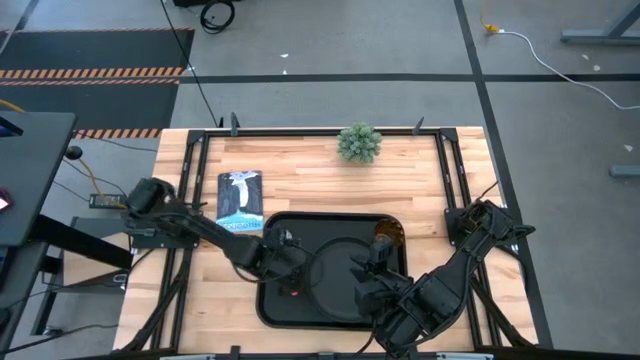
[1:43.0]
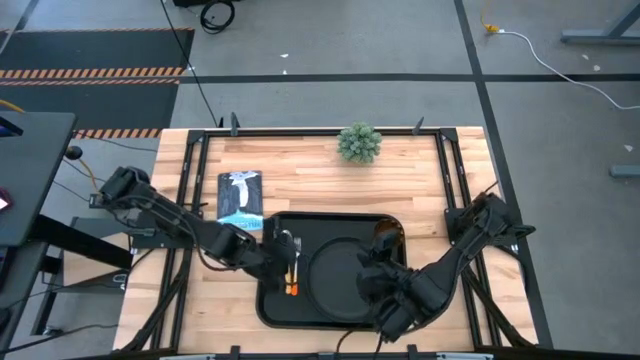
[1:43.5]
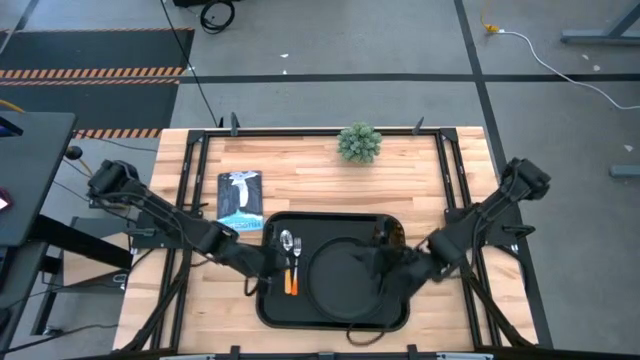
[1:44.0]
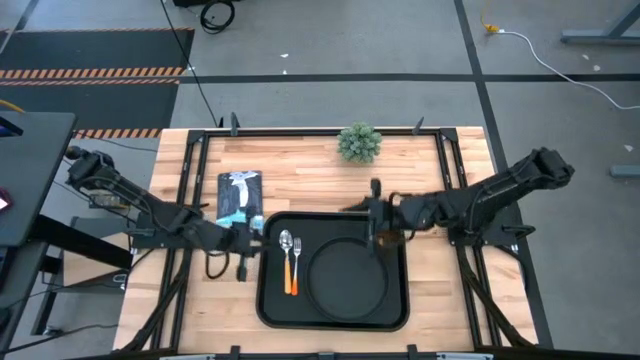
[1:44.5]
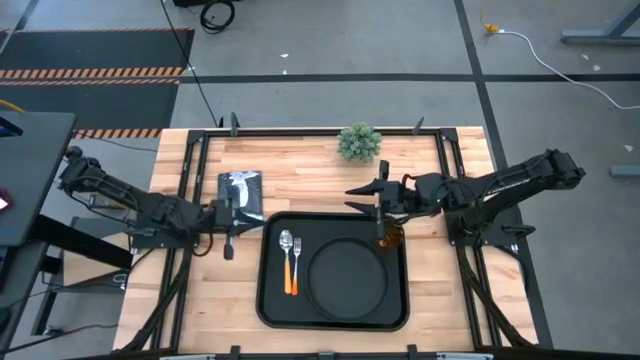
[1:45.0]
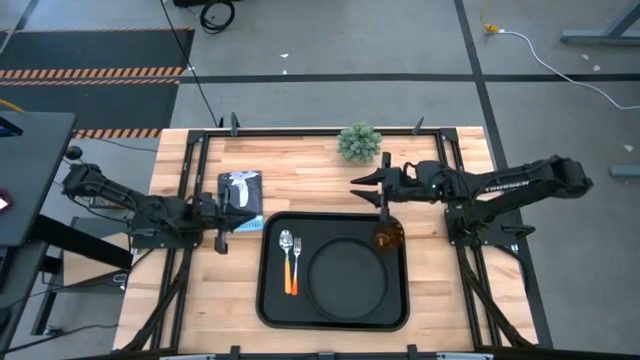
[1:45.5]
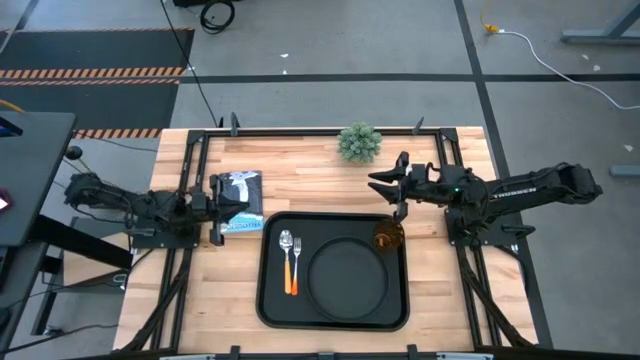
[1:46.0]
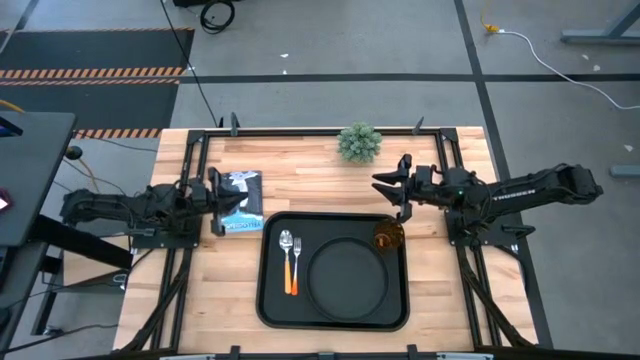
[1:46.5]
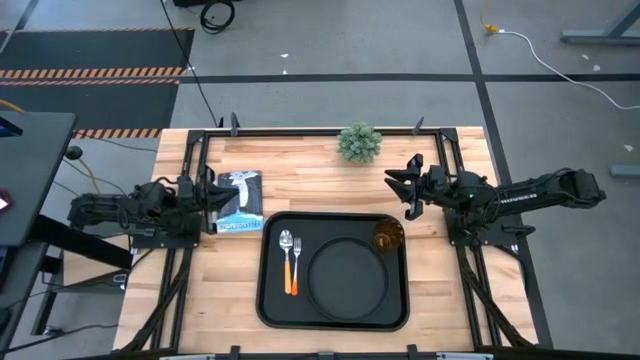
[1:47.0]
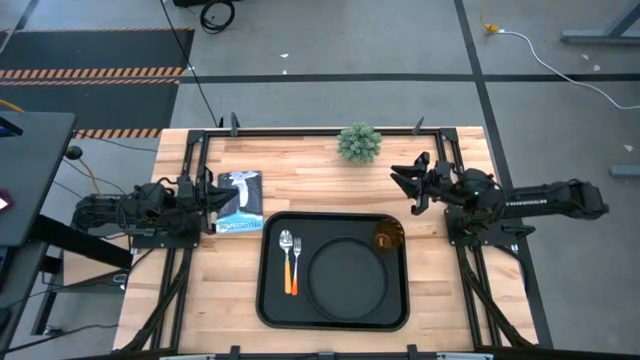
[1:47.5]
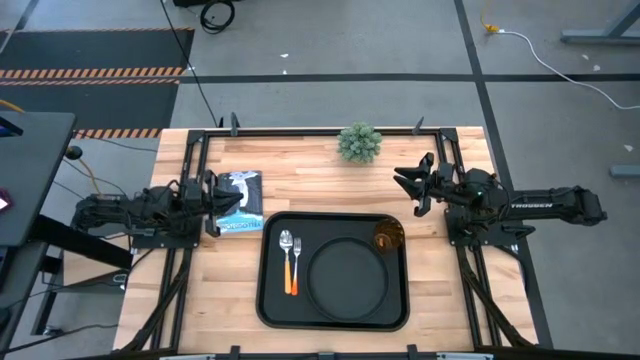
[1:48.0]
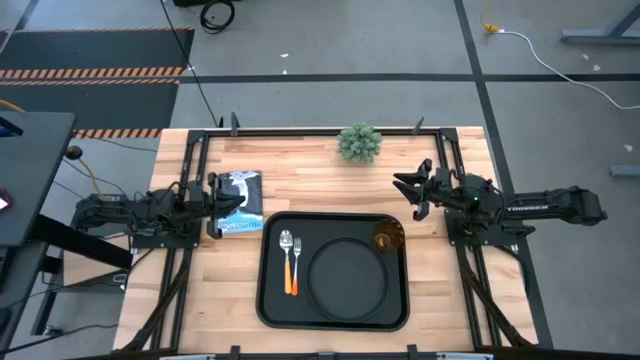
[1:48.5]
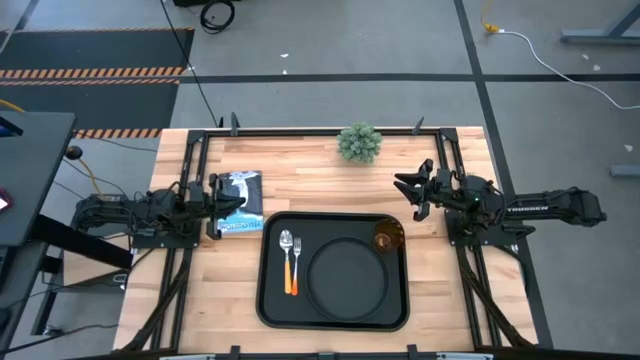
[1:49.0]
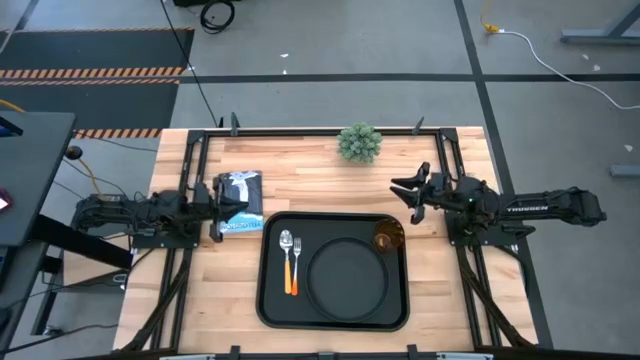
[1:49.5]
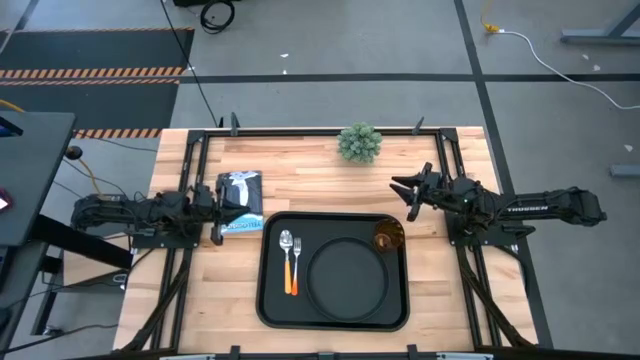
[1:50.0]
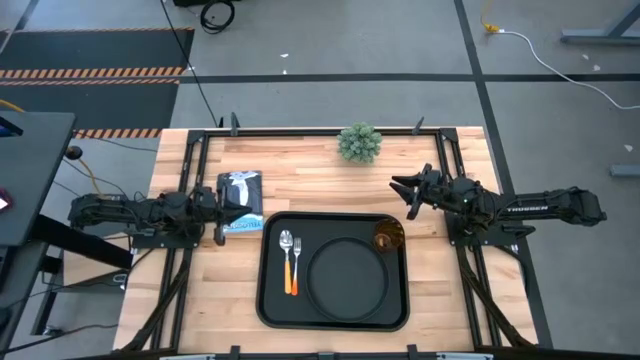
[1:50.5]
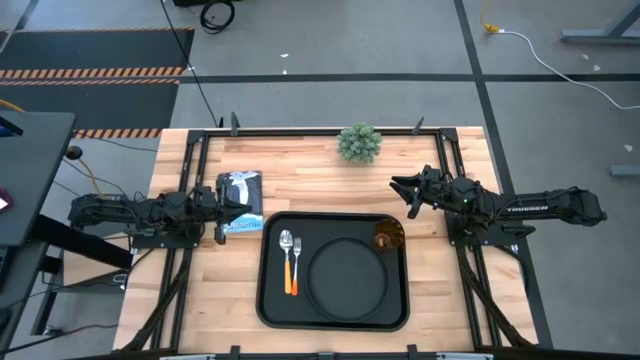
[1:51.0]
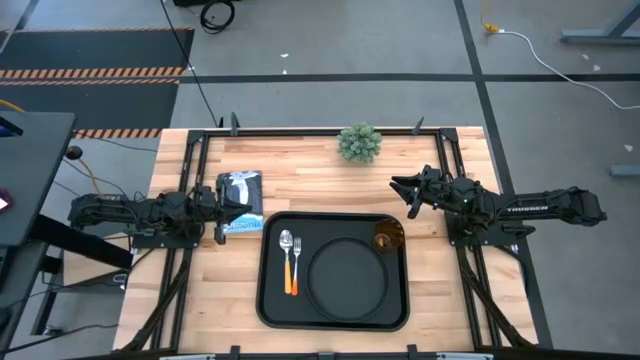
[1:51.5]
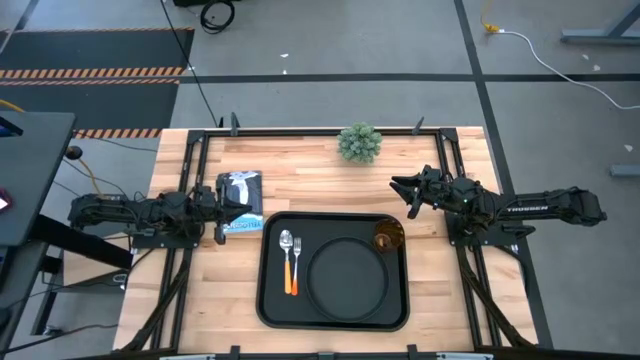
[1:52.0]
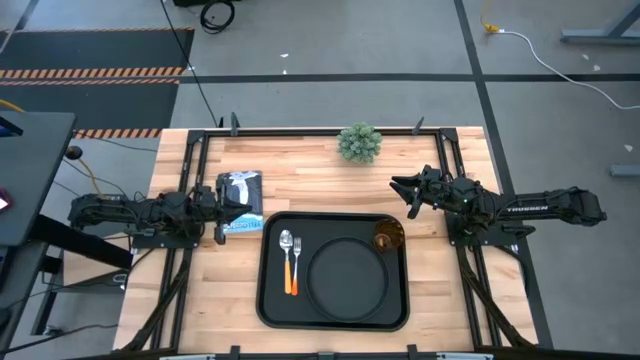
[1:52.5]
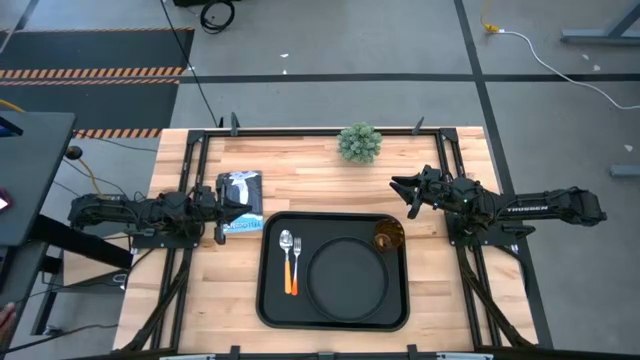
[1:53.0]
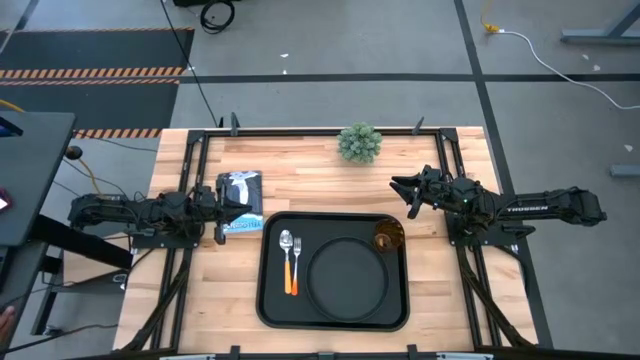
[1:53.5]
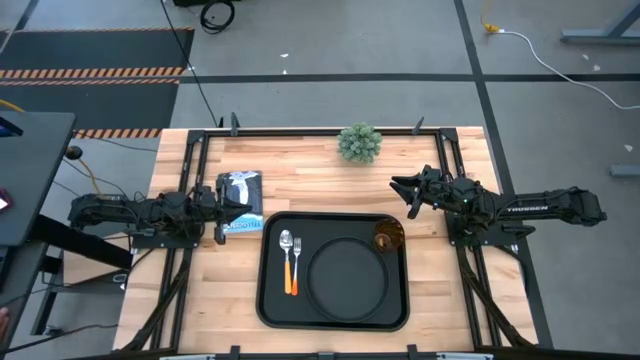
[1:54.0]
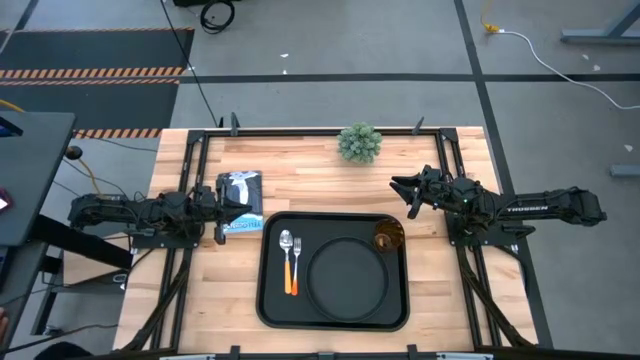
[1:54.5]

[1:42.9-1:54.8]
Task: Pick and place plate/cup/fork/spoon on tray
Return to Home Position

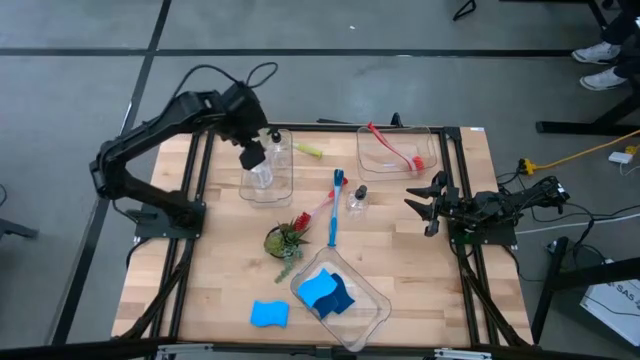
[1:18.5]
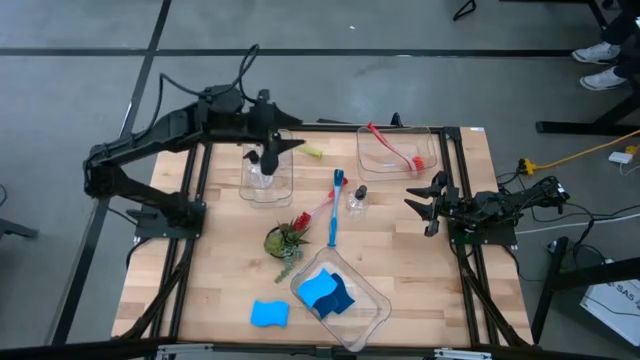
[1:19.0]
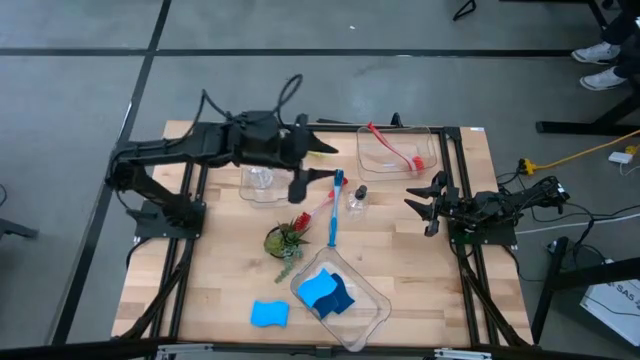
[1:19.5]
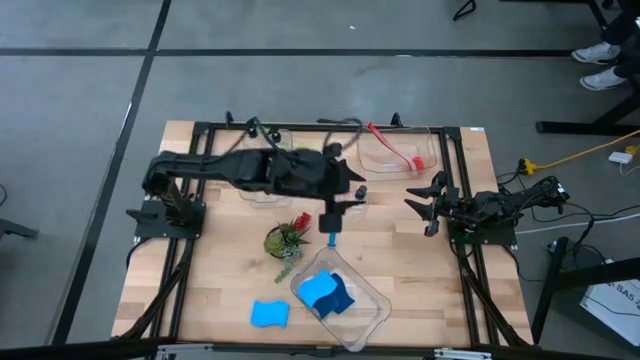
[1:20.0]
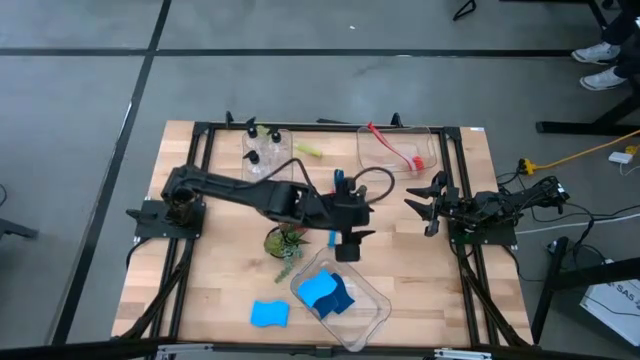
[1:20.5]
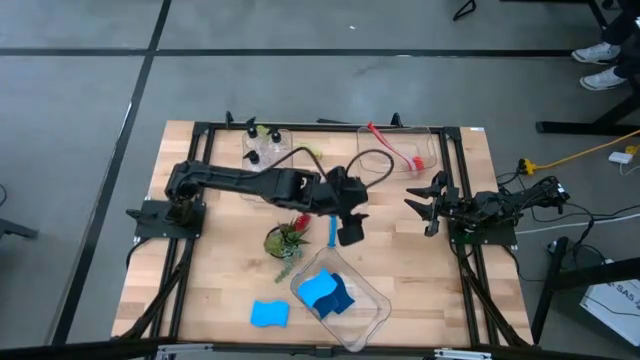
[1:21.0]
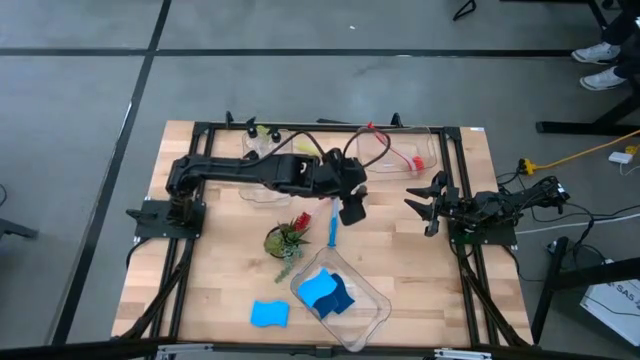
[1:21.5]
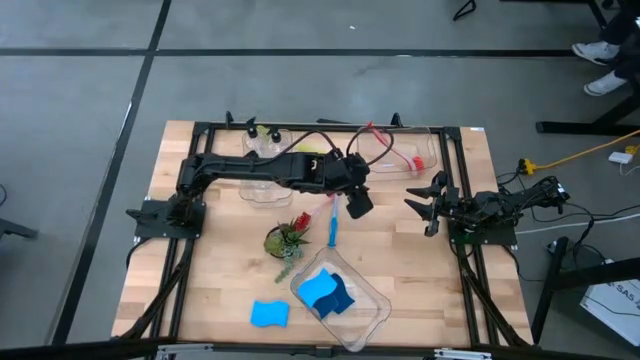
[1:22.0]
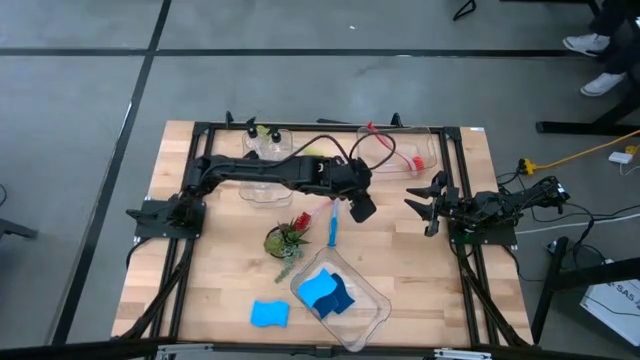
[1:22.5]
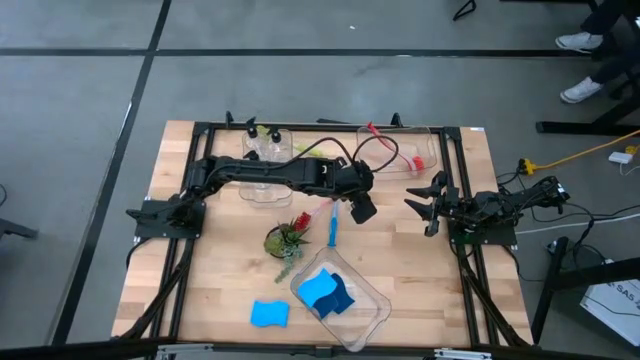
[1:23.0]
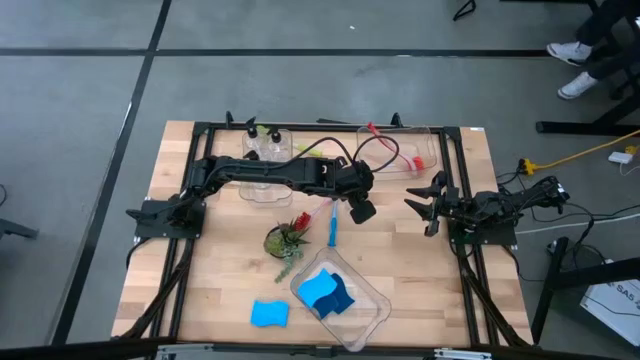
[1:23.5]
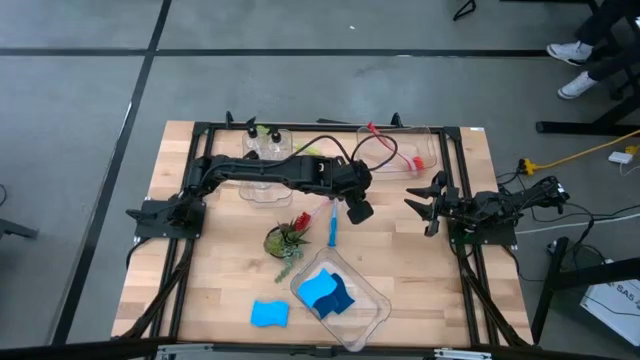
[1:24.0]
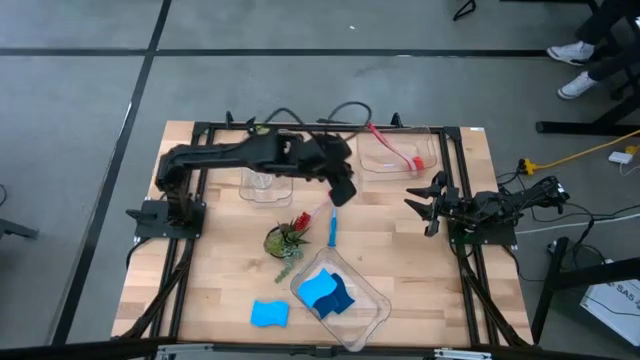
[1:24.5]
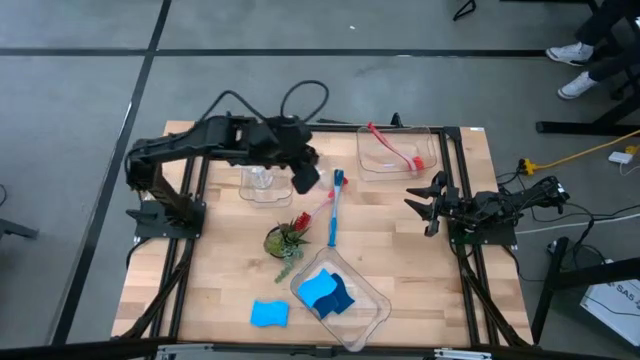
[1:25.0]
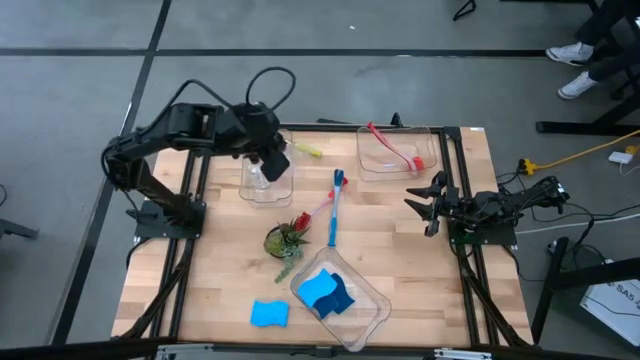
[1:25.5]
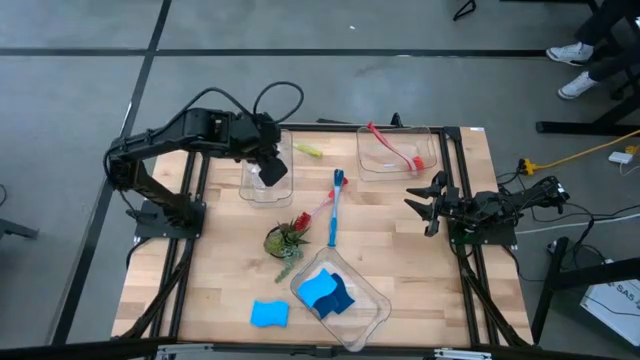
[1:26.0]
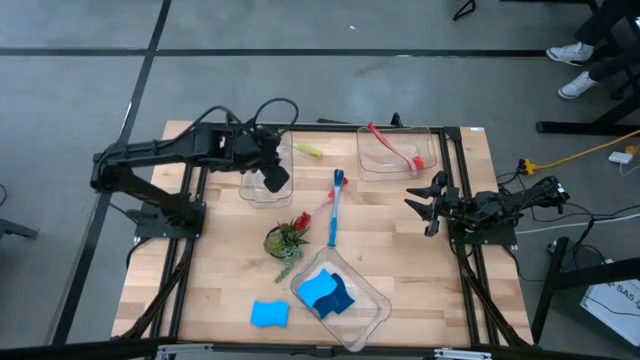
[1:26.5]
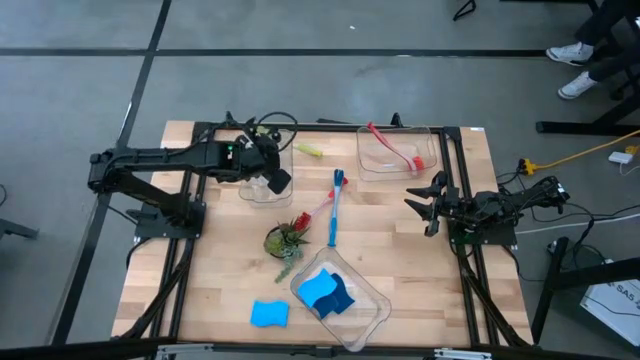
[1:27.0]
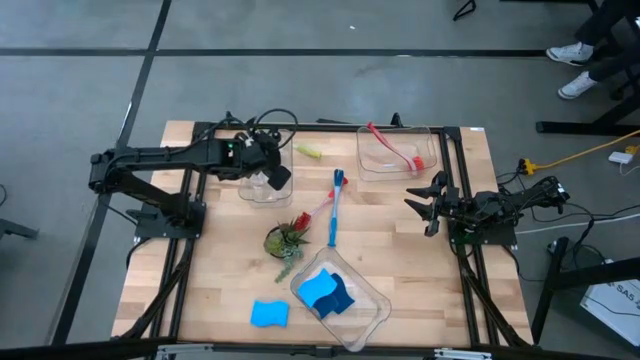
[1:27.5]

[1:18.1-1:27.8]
Task: Pick & Place Kitchen Sink Supplies
Put the transparent soap dispenser into the top left transparent bin
